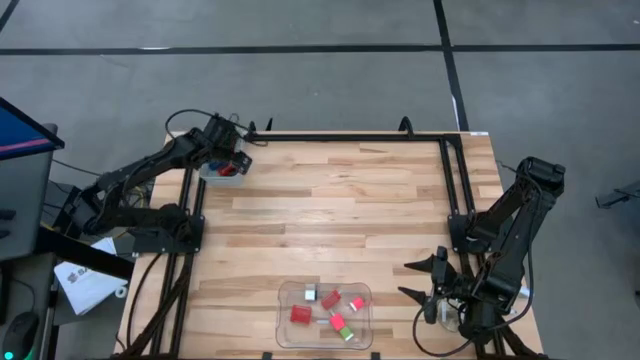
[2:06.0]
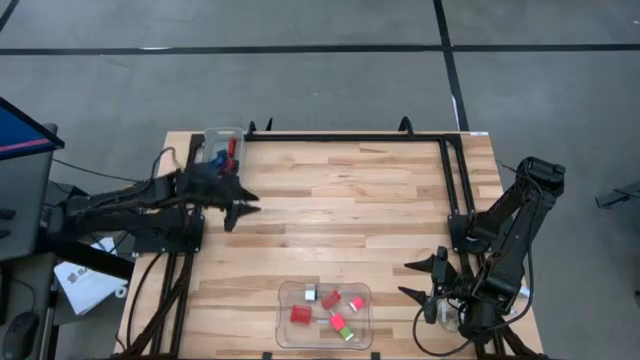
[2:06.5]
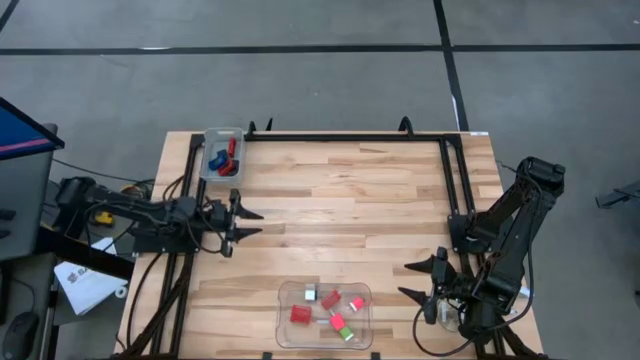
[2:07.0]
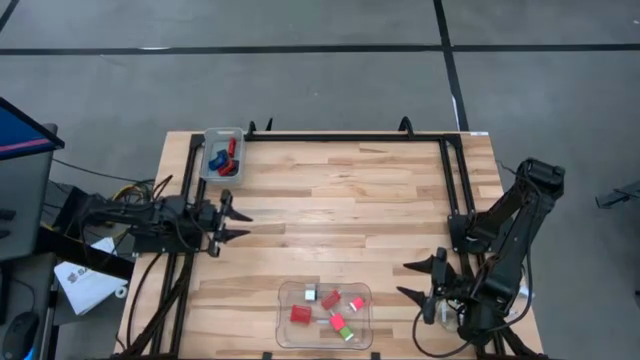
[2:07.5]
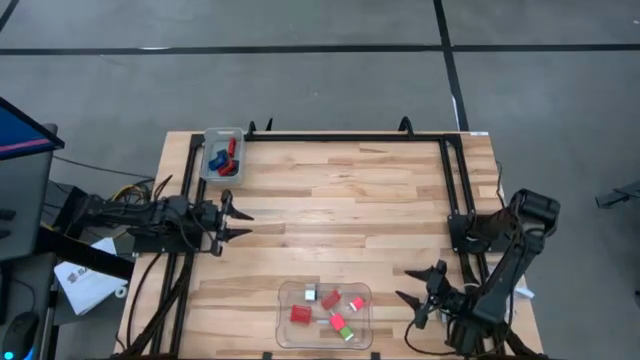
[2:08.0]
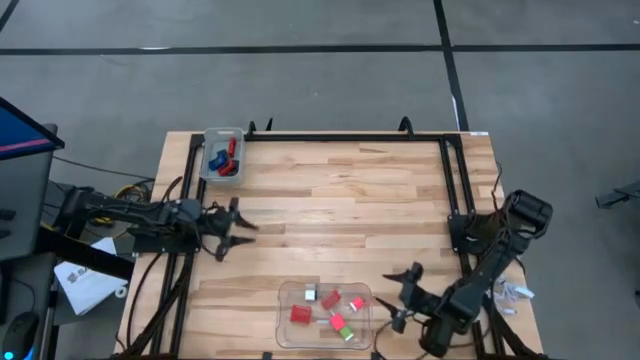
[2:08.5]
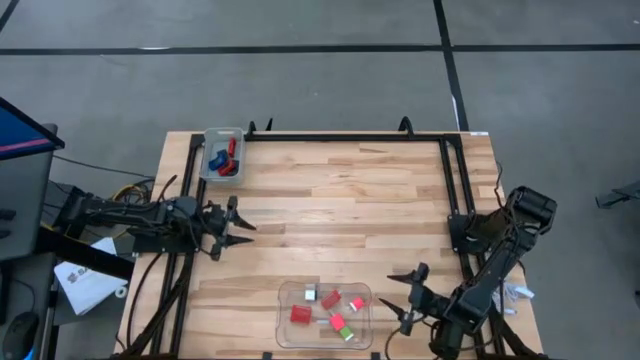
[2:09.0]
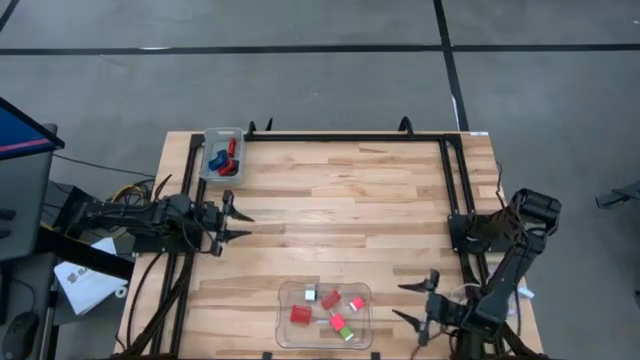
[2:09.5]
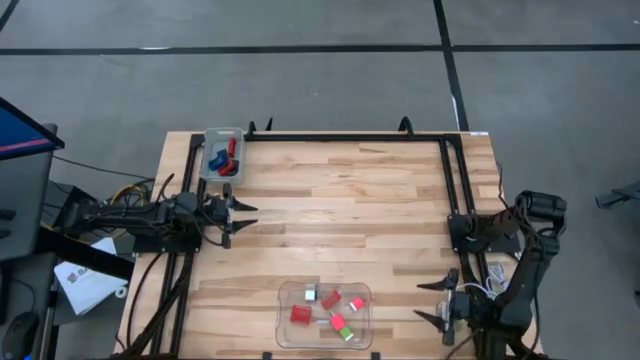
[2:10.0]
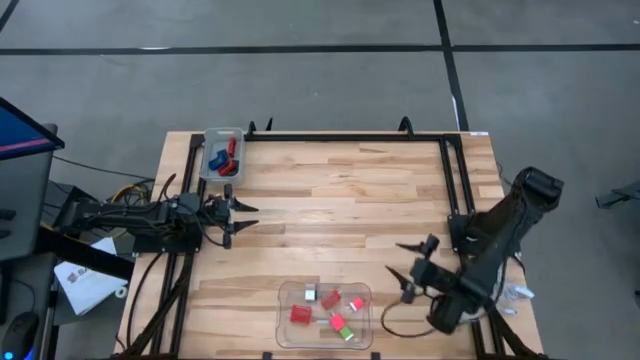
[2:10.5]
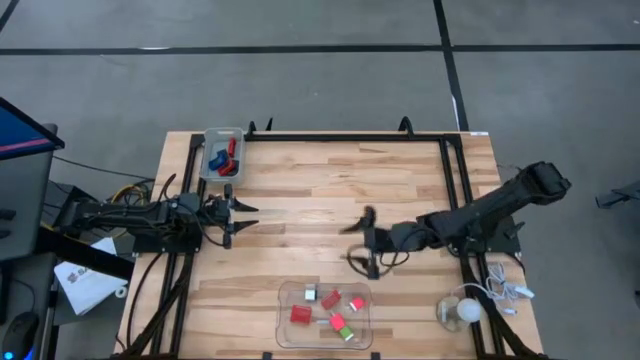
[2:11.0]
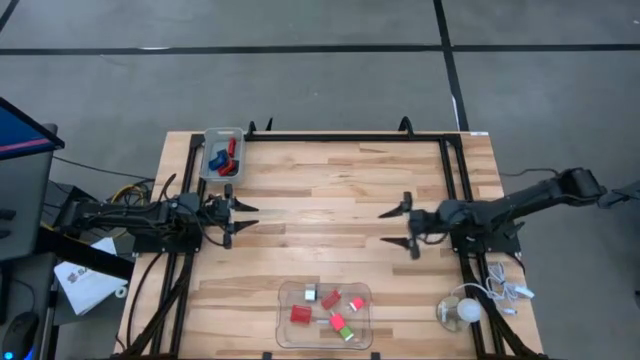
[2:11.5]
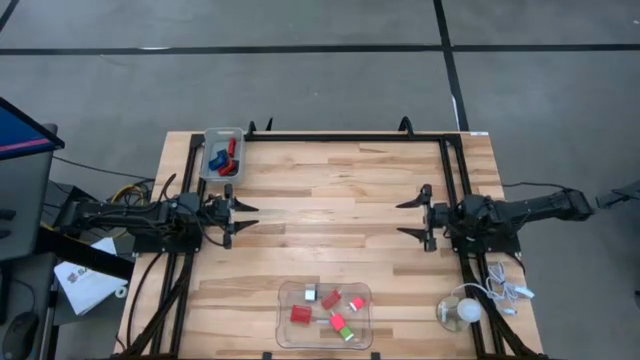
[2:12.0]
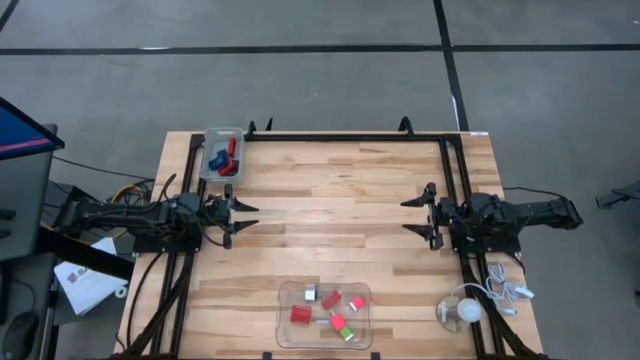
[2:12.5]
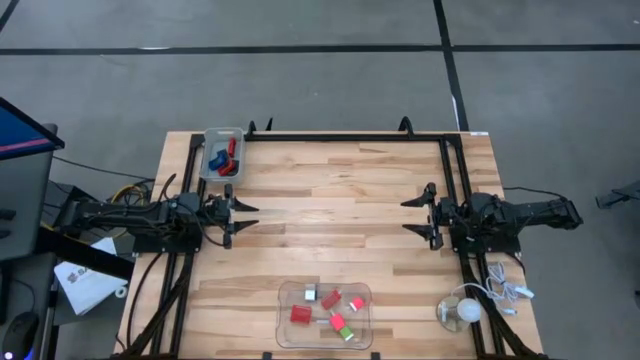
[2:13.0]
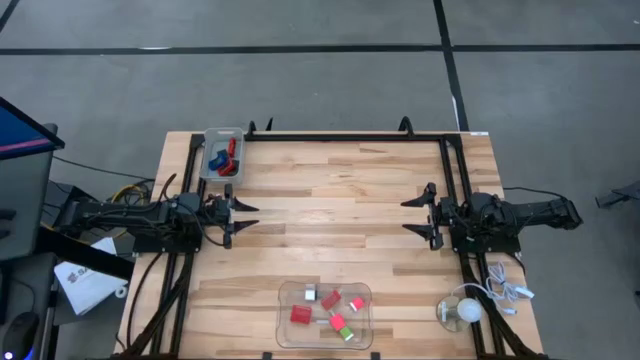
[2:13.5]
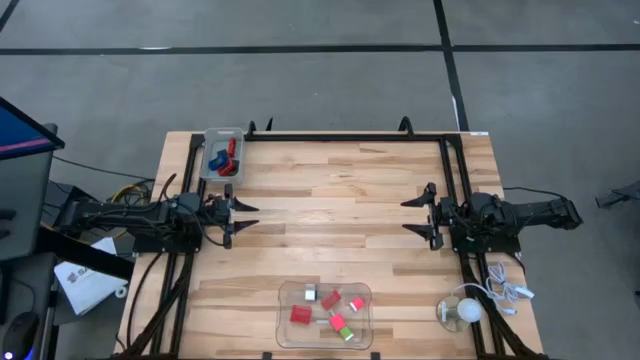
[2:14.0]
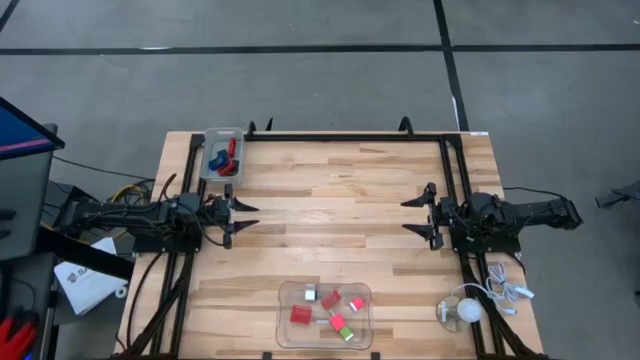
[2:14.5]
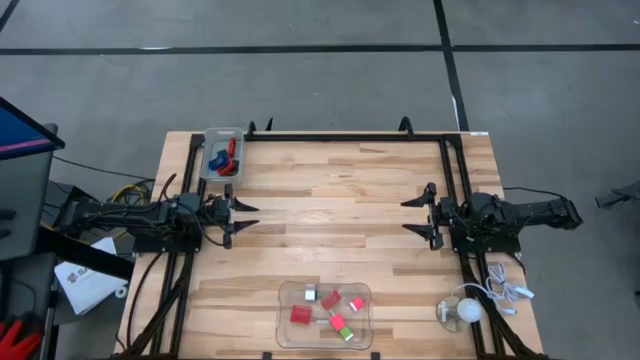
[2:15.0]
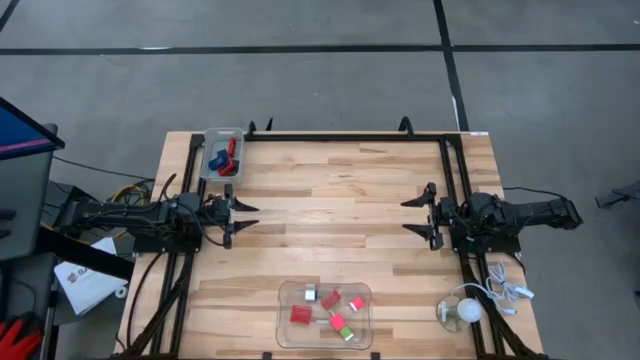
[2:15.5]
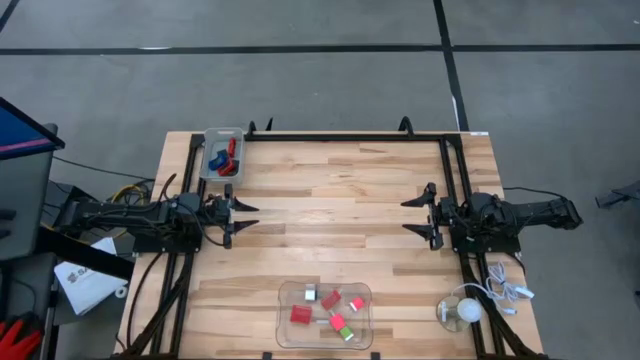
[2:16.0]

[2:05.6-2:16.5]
Task: Pick & Place Office items
Return to Home Position

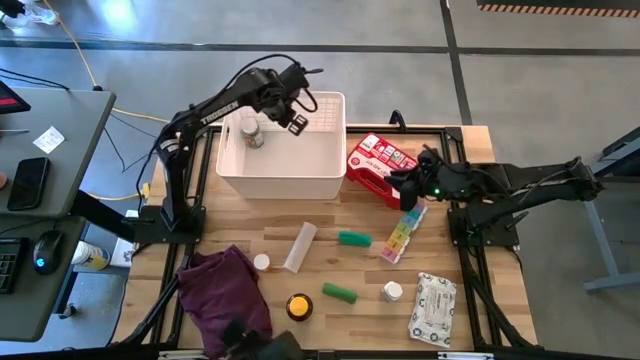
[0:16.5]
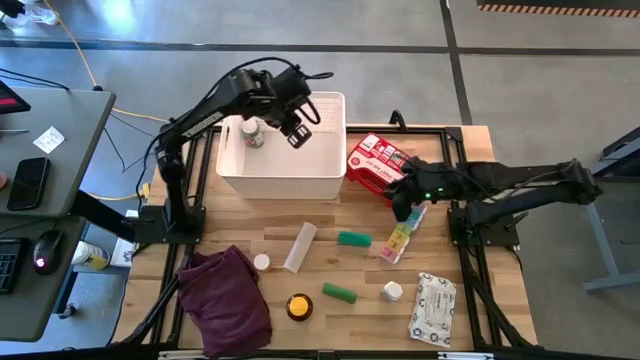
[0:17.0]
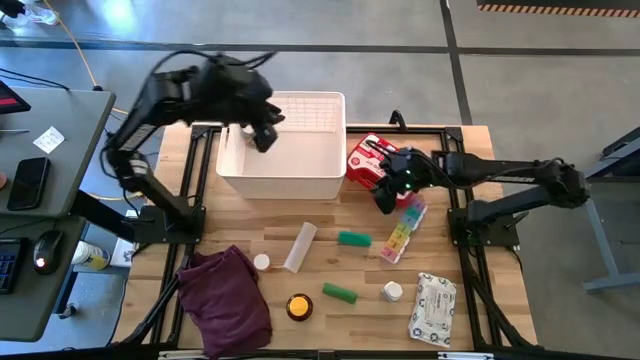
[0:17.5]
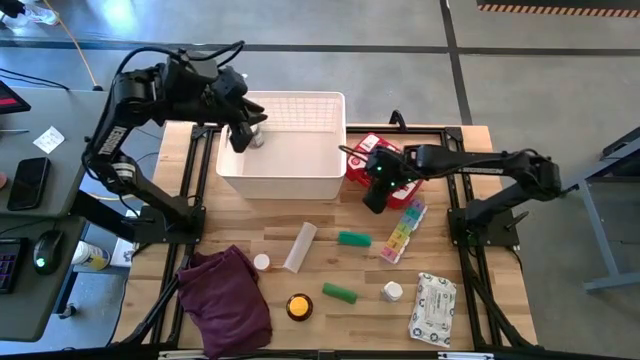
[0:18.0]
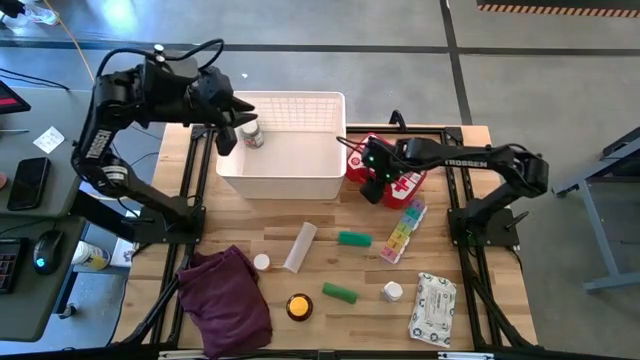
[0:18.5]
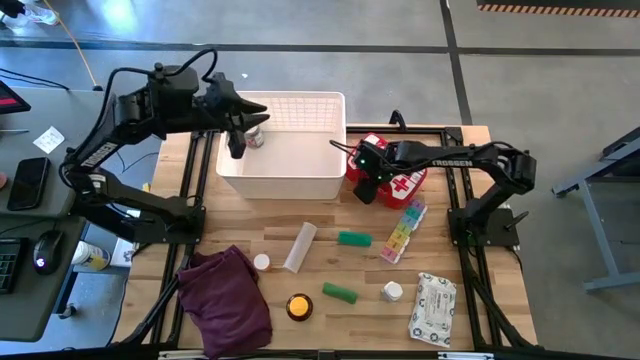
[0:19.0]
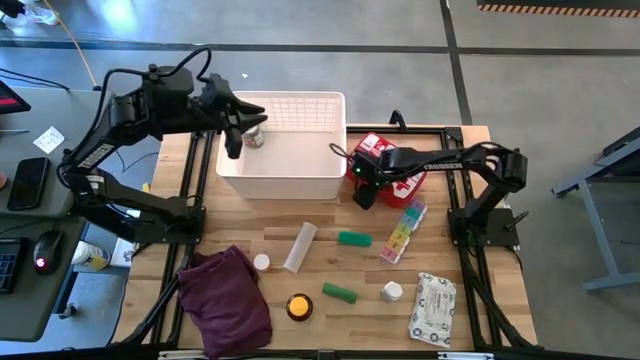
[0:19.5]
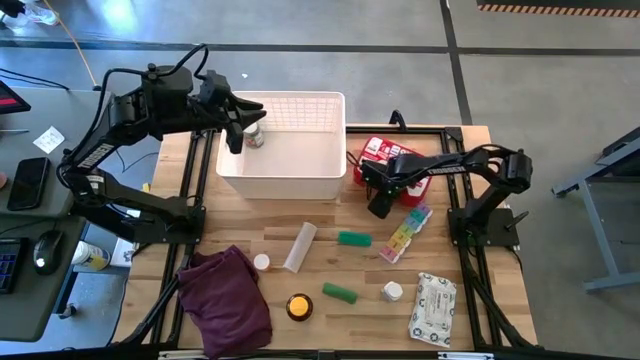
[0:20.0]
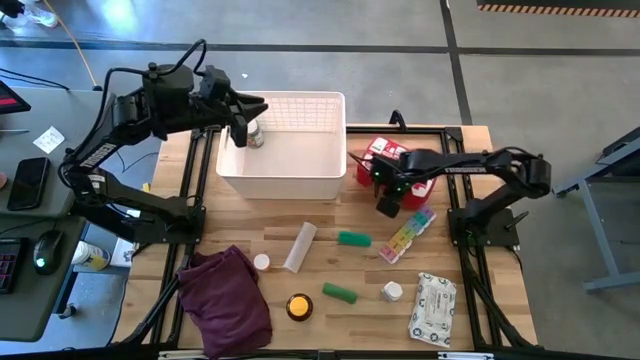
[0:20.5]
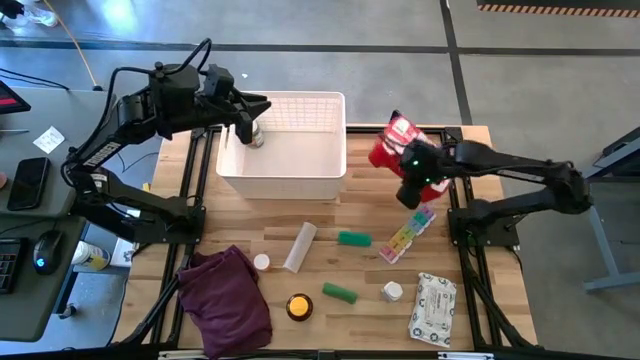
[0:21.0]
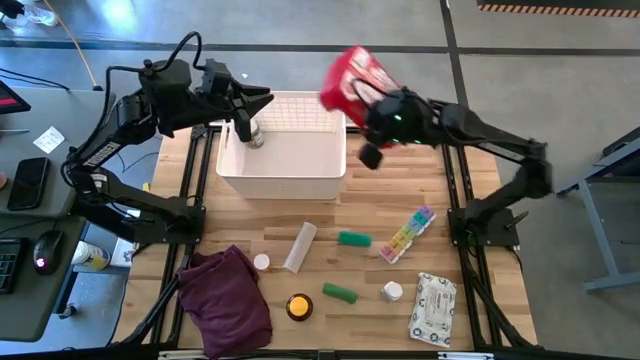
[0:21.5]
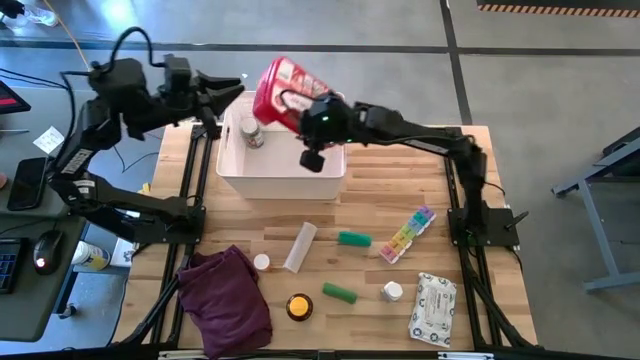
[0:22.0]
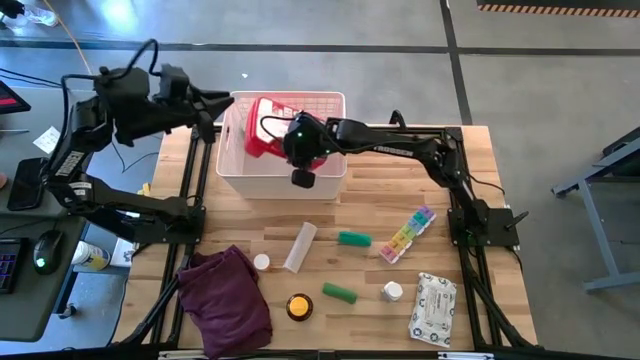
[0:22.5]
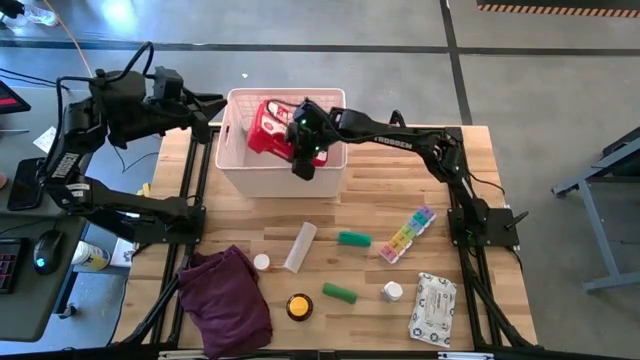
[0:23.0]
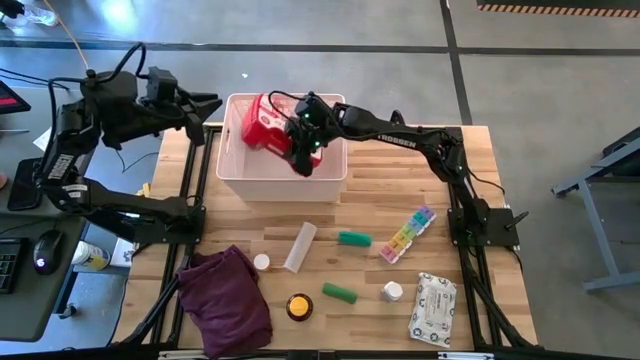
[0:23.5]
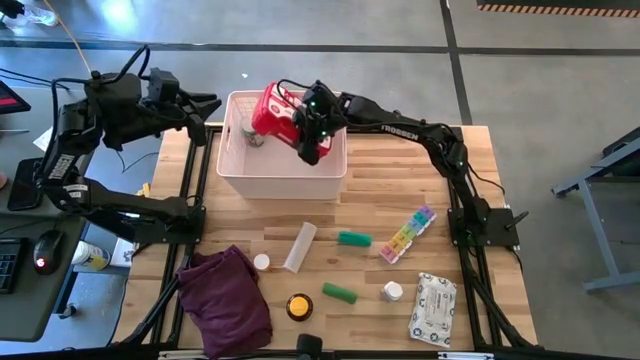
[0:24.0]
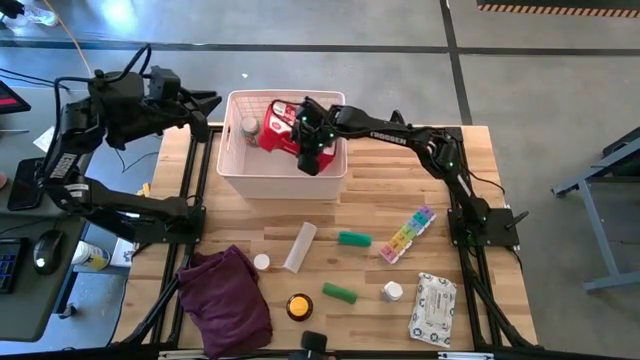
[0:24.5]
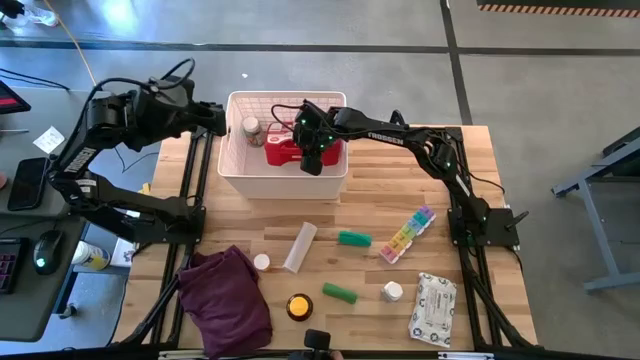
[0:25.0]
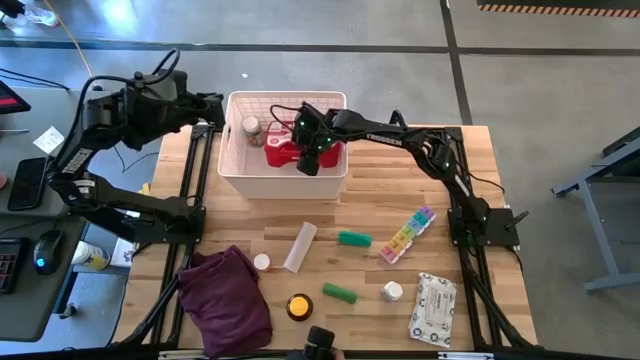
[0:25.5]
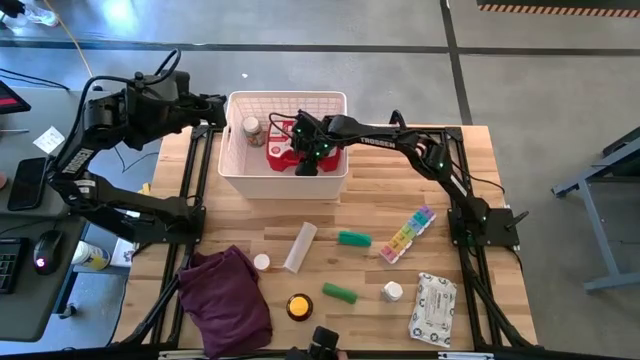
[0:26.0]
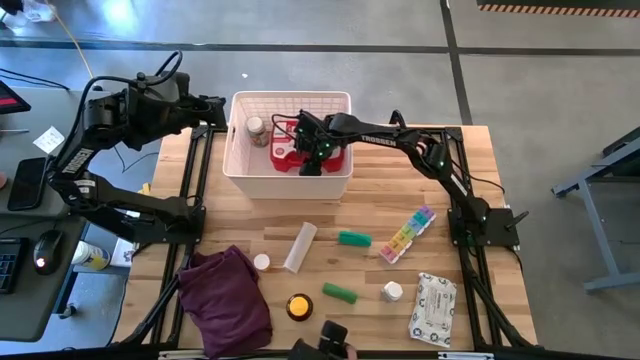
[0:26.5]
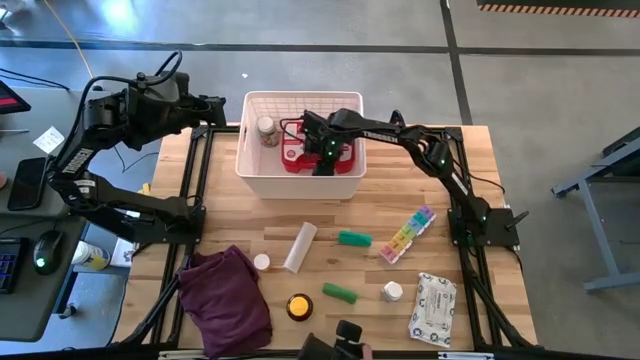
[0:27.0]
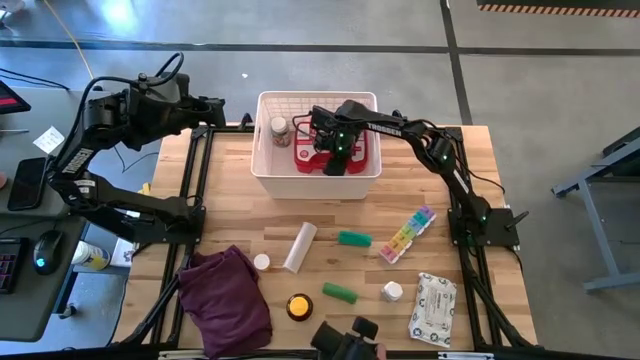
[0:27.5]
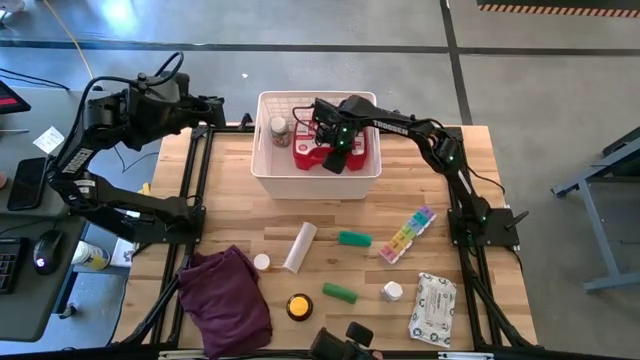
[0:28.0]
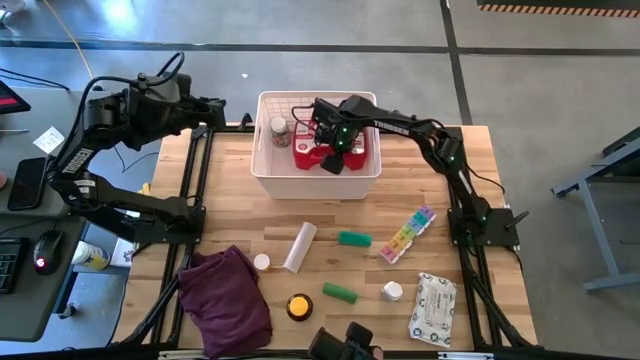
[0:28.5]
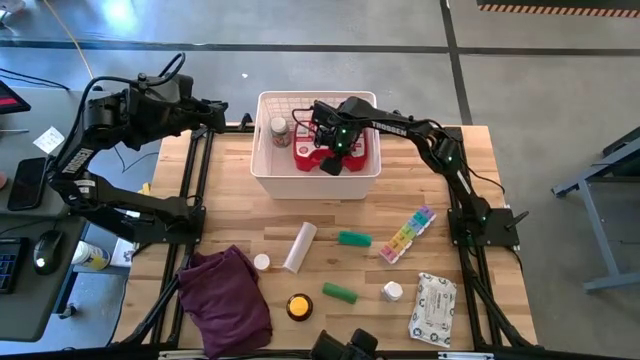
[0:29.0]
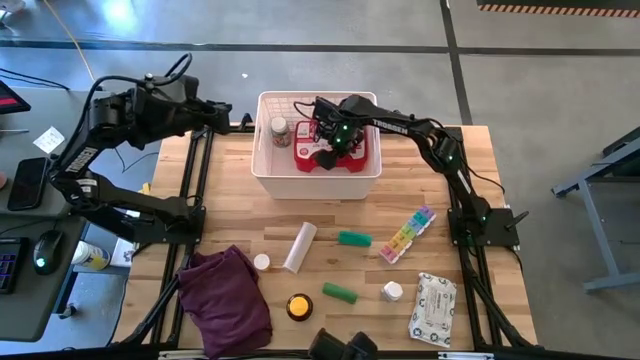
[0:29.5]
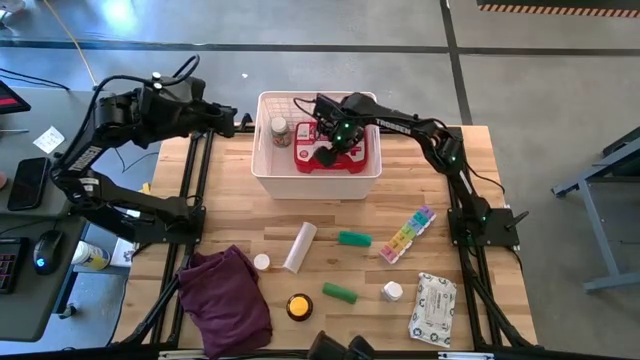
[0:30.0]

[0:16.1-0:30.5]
Task: Pick & place medical supplies in basket/bin
Put the first aid kit into the white bin
